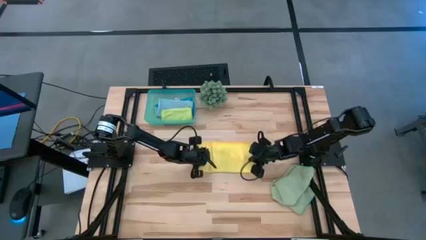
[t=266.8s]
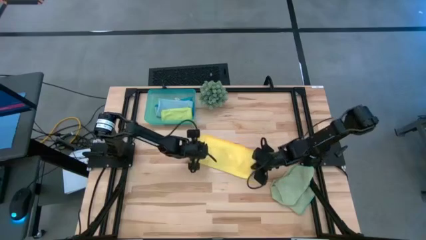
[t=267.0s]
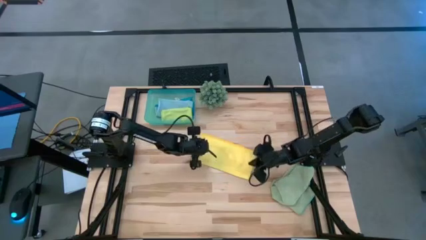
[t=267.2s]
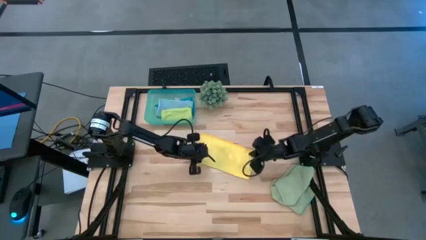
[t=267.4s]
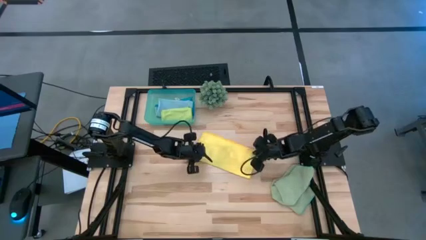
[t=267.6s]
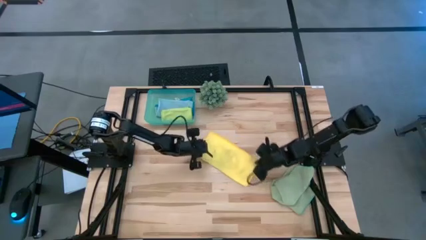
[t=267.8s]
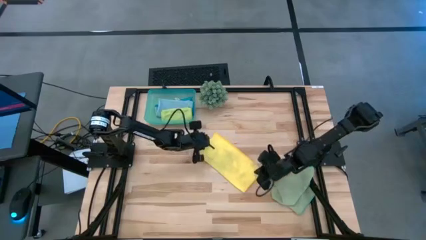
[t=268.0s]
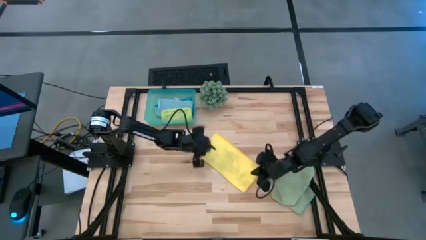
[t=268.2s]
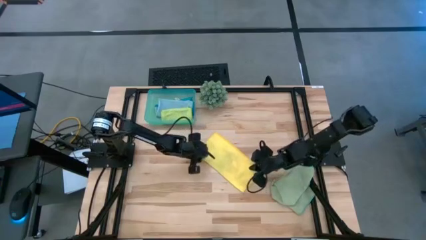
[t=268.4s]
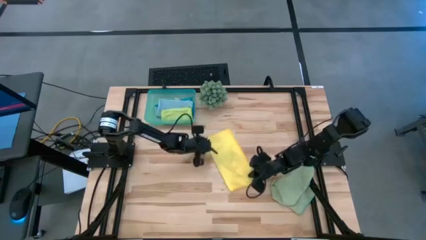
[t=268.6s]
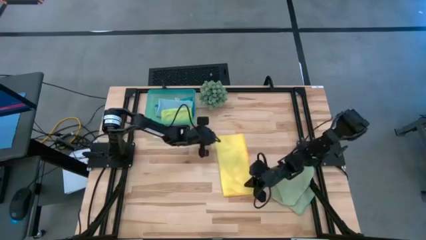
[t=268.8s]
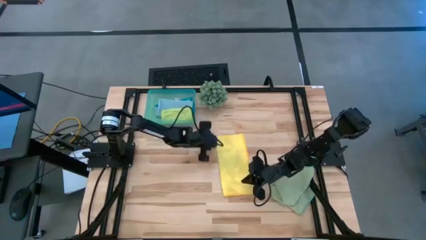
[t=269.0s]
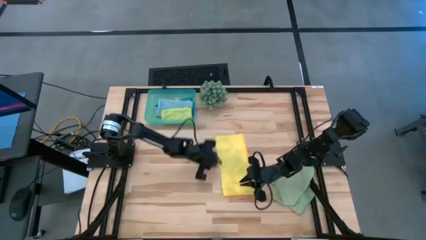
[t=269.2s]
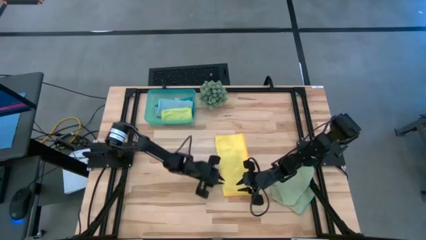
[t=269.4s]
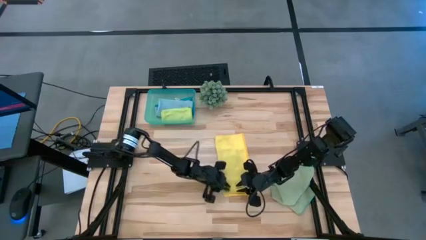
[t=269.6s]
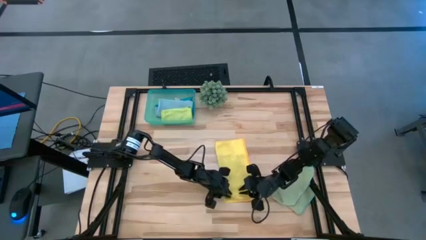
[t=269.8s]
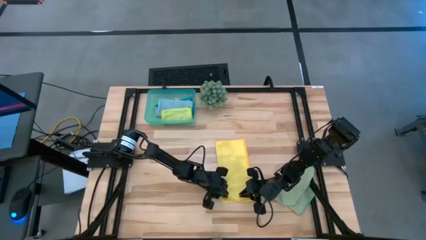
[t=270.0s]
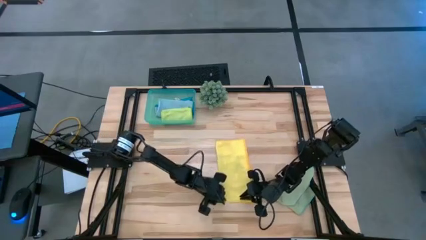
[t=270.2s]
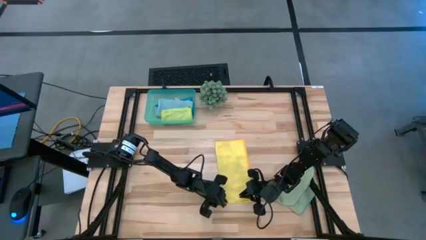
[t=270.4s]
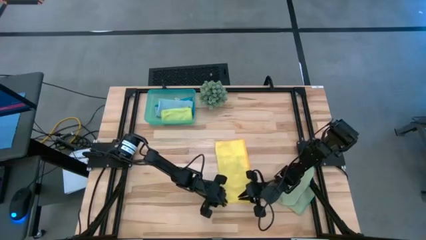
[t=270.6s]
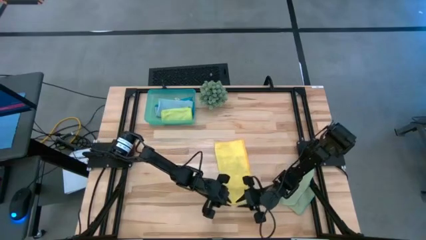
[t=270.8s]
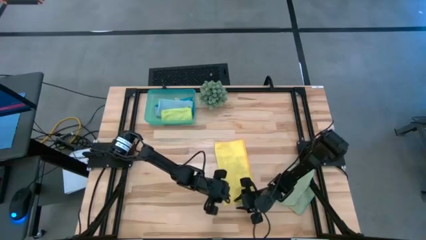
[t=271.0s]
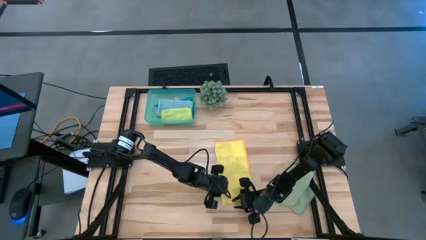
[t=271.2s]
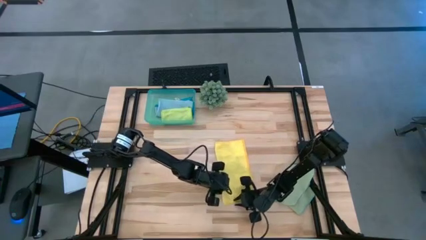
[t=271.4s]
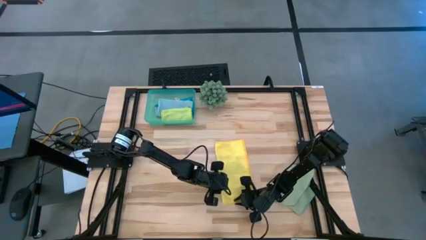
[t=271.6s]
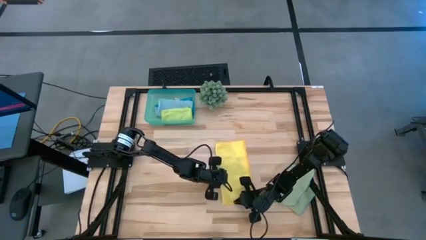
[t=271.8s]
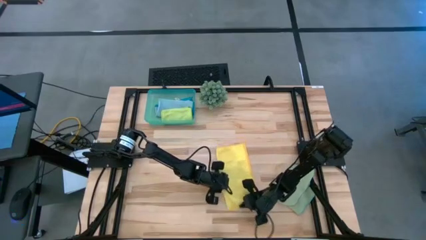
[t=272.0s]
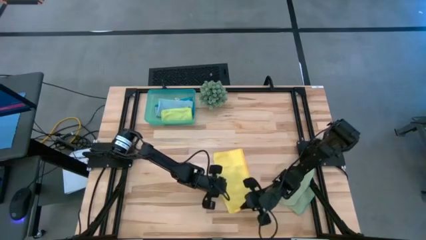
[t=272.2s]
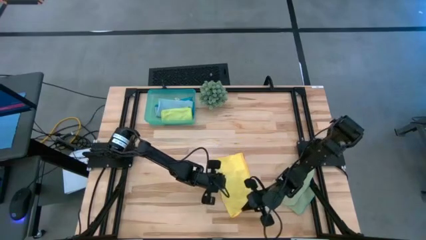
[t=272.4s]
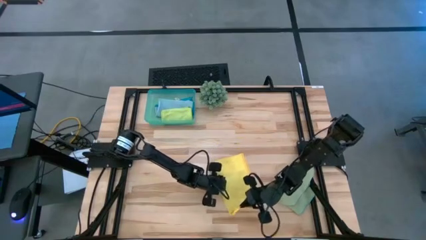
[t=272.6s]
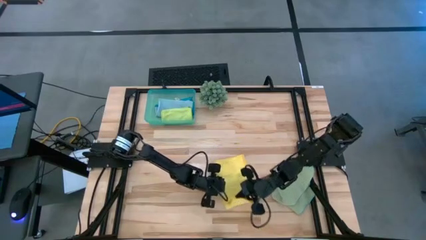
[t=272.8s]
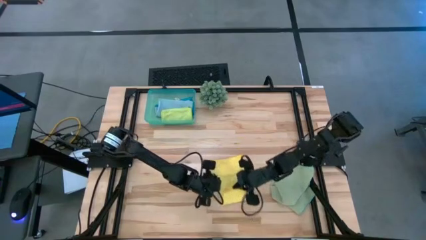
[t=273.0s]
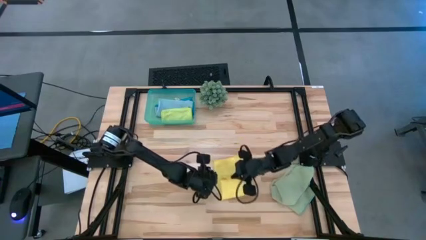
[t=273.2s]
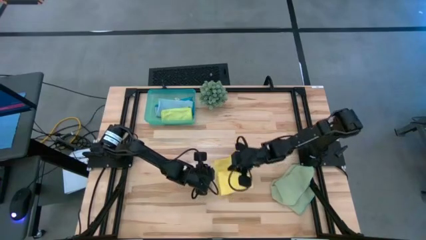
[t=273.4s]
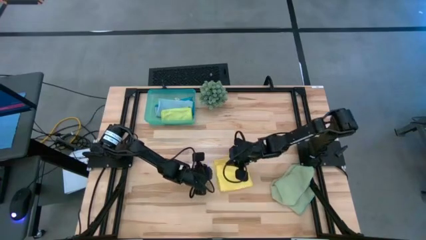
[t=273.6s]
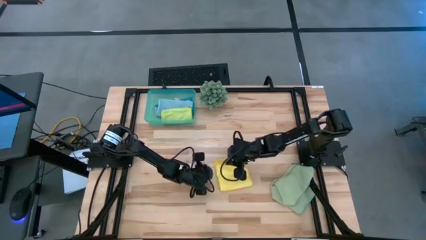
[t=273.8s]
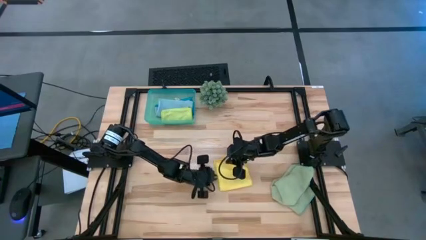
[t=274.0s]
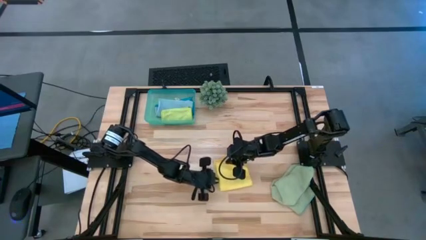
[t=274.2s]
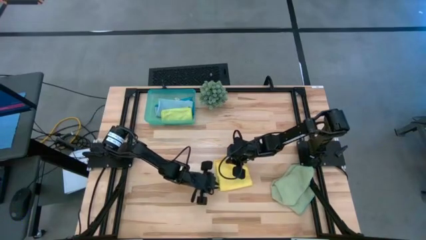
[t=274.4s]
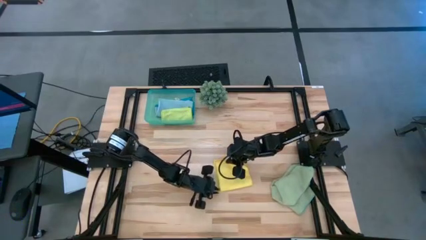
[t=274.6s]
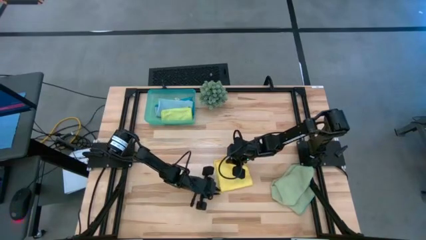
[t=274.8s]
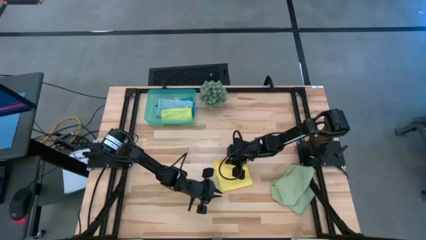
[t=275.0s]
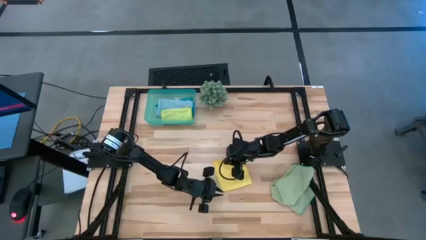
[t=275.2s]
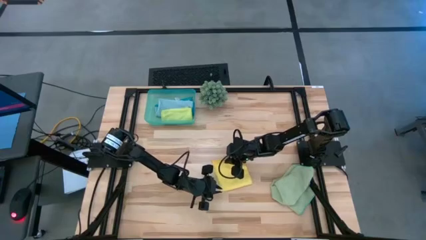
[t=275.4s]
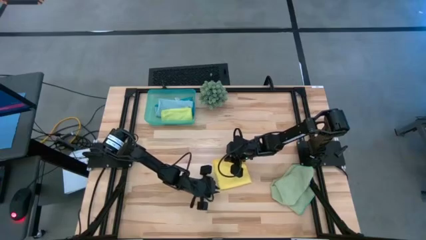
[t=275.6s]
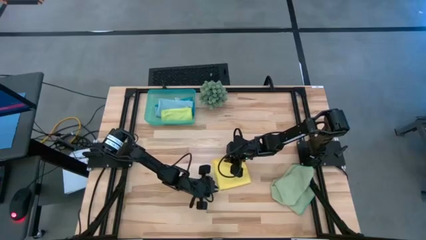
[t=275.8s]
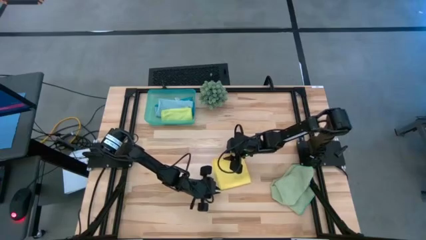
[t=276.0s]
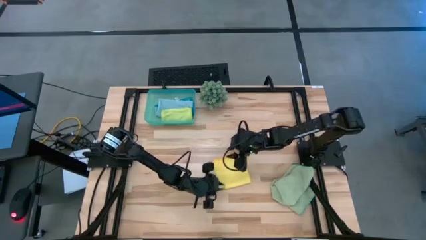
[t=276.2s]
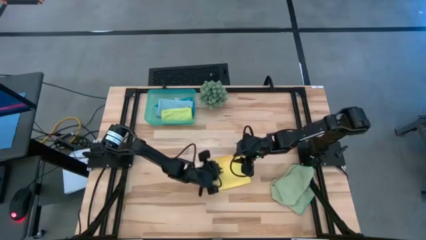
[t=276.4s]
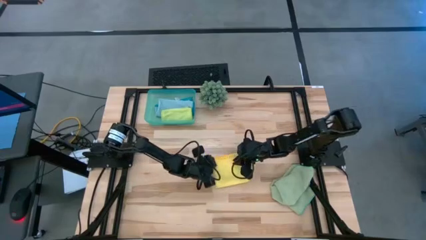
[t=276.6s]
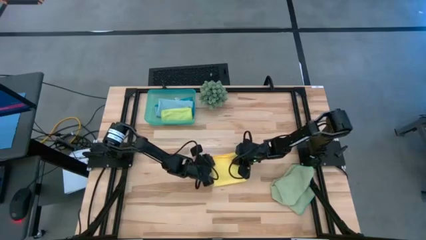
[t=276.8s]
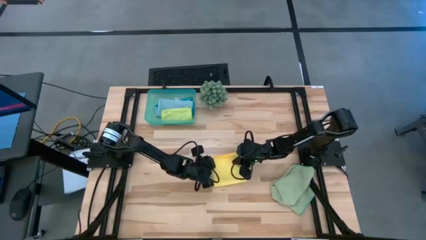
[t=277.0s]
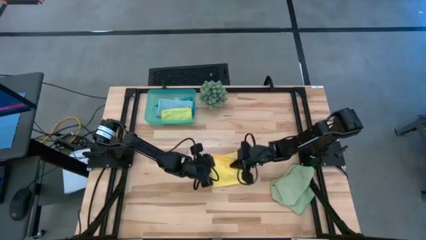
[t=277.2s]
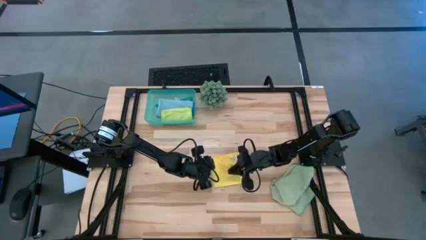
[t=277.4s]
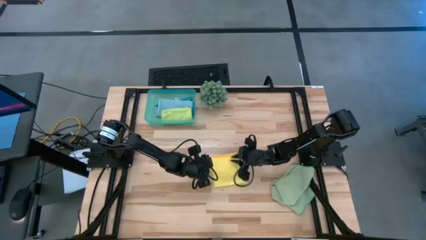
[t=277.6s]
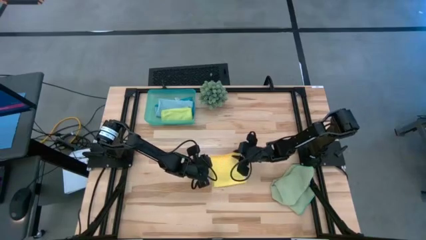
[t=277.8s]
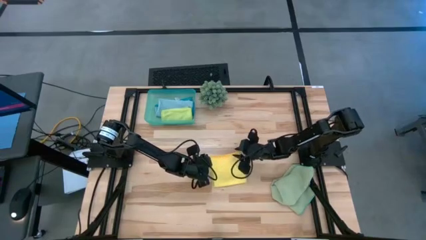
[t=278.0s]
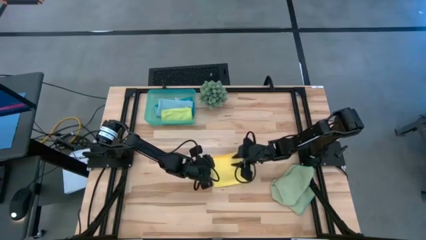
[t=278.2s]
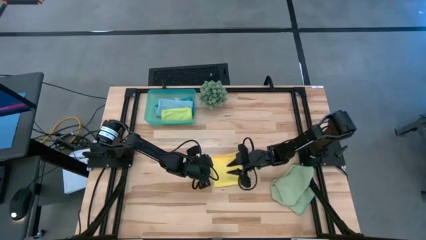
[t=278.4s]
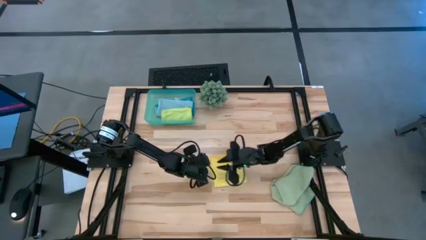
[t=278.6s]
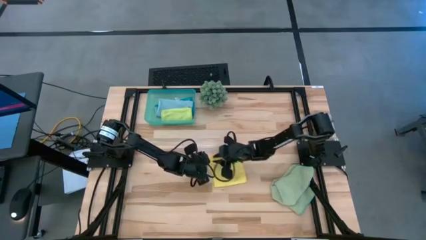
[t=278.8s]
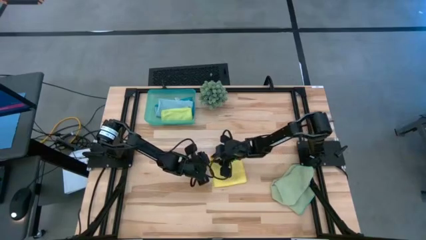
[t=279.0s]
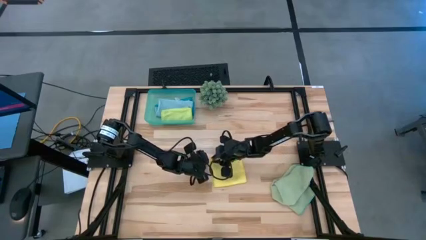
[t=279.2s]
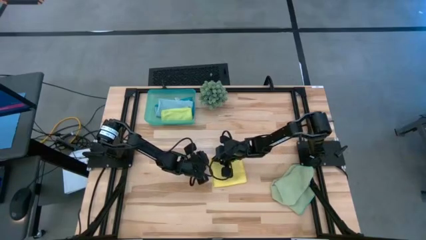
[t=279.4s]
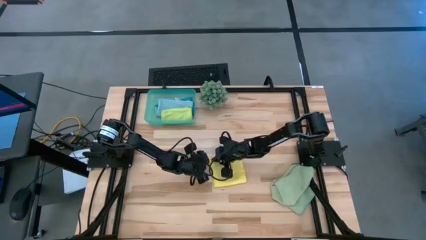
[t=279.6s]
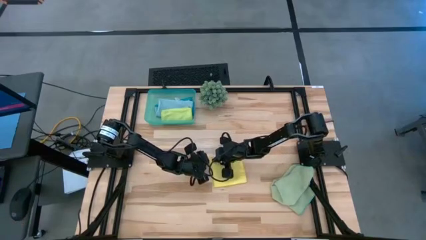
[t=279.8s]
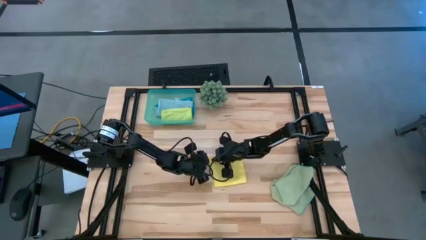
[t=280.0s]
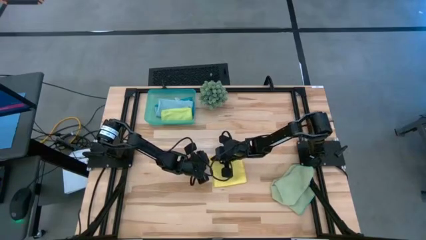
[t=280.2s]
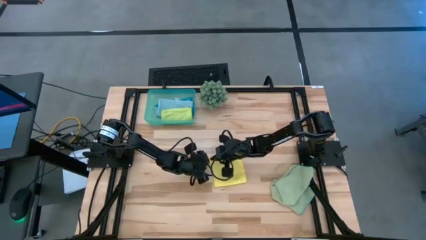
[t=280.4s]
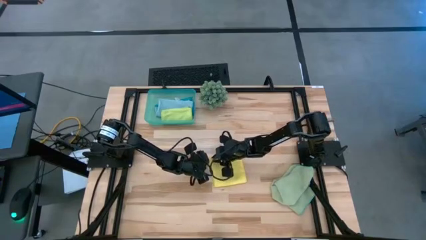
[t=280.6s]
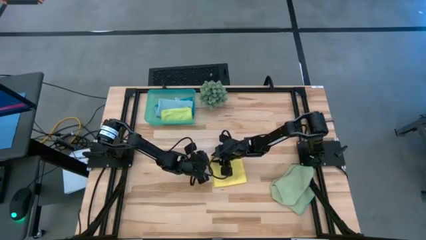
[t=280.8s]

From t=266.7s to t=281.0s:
Task: Fold microfiber towels
Fold the yellow microfiber cloth
